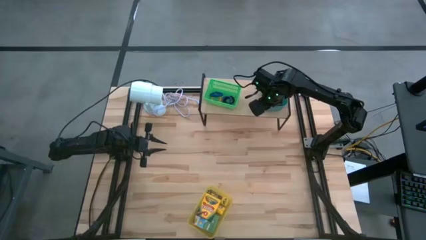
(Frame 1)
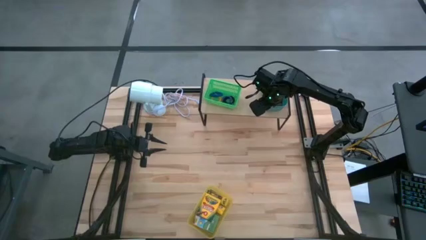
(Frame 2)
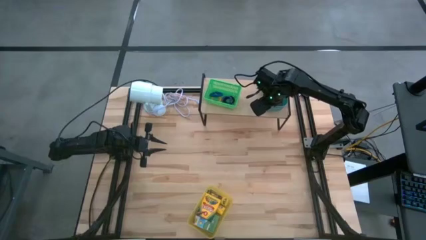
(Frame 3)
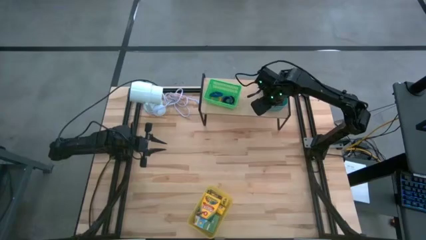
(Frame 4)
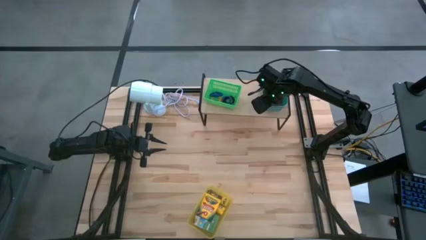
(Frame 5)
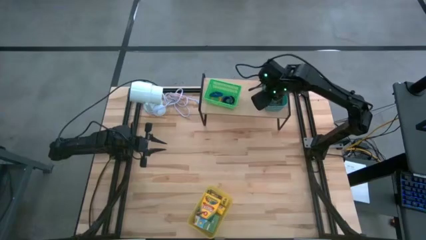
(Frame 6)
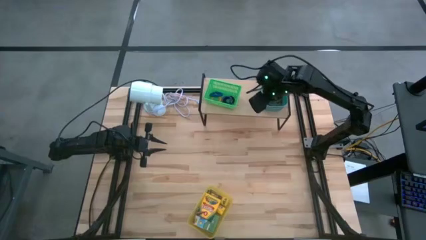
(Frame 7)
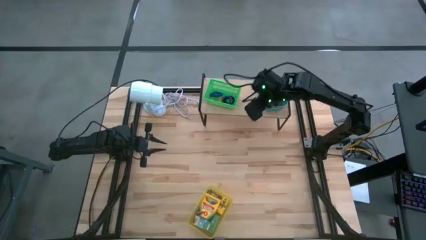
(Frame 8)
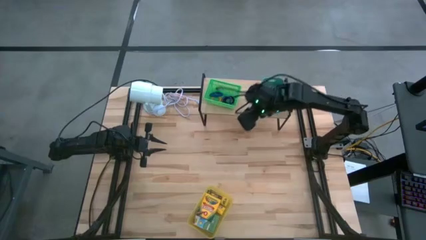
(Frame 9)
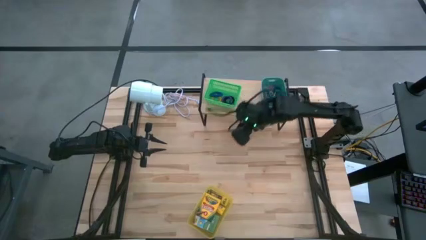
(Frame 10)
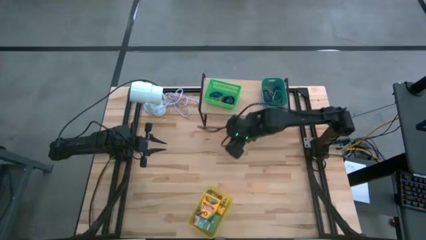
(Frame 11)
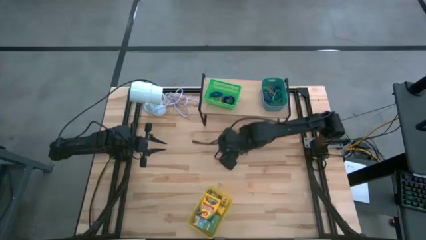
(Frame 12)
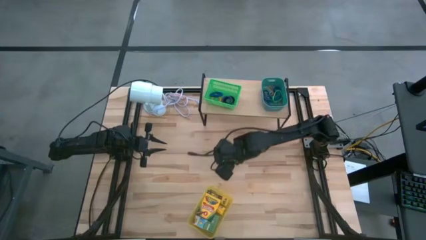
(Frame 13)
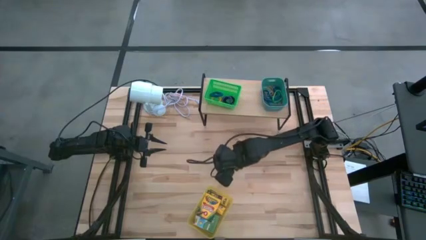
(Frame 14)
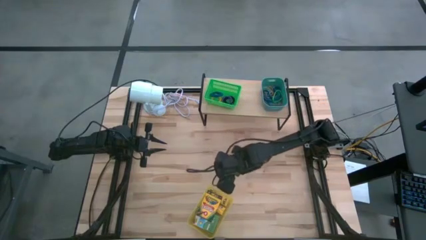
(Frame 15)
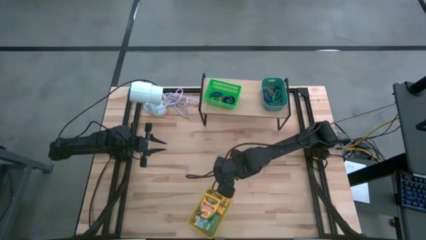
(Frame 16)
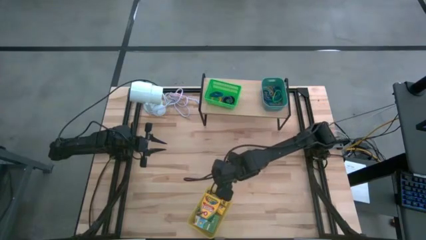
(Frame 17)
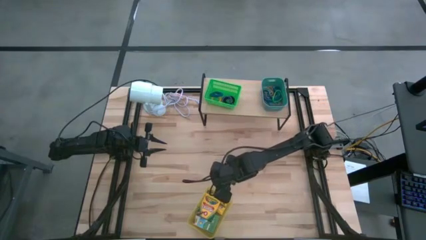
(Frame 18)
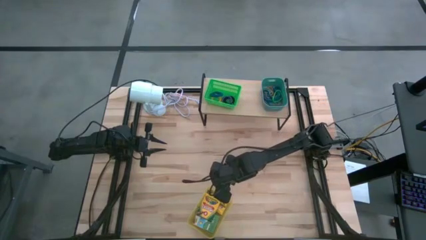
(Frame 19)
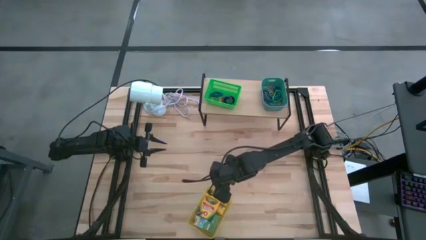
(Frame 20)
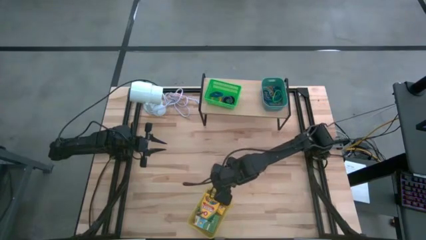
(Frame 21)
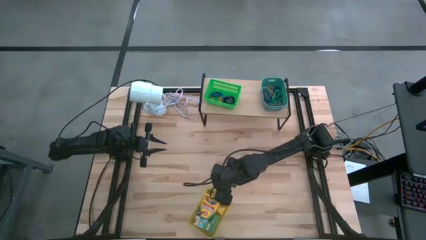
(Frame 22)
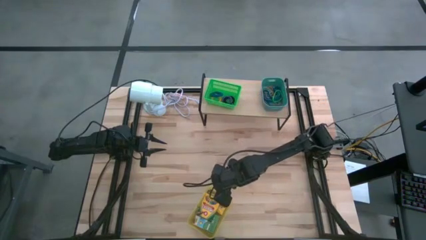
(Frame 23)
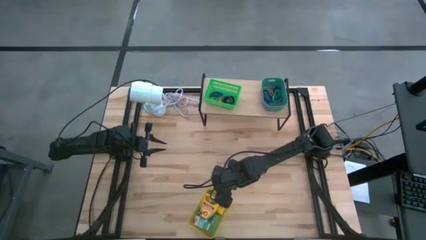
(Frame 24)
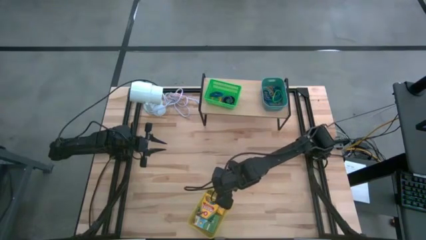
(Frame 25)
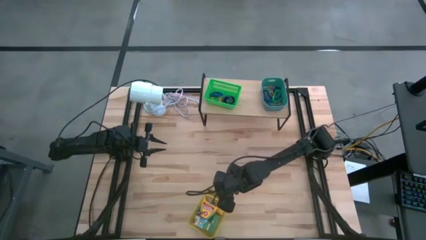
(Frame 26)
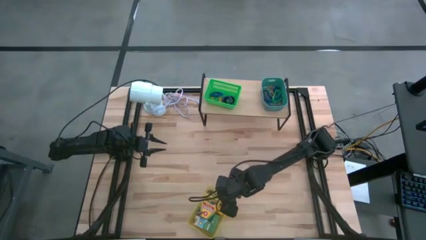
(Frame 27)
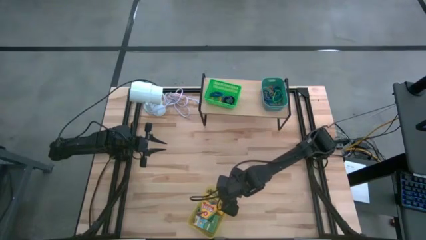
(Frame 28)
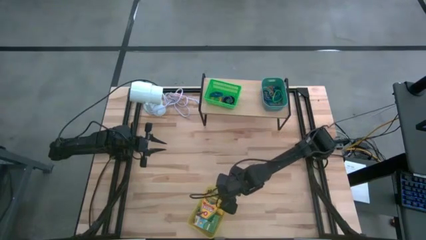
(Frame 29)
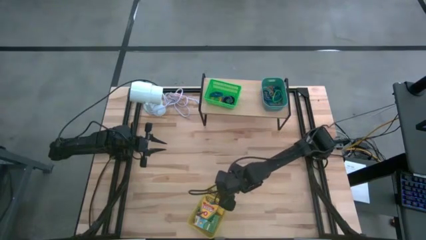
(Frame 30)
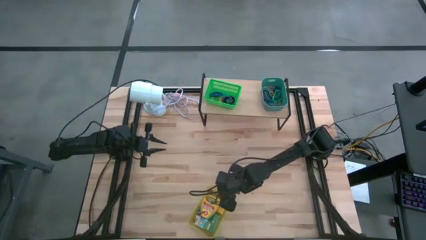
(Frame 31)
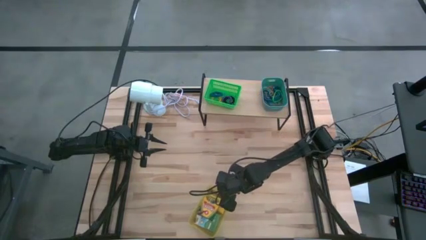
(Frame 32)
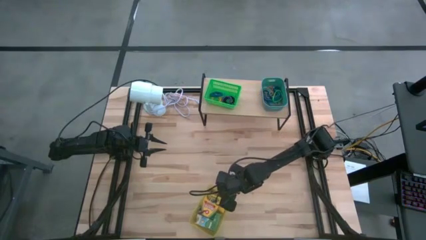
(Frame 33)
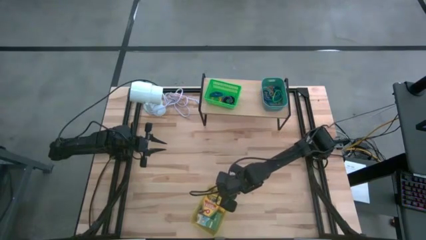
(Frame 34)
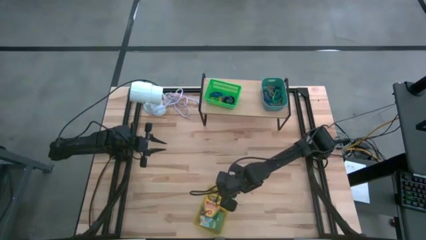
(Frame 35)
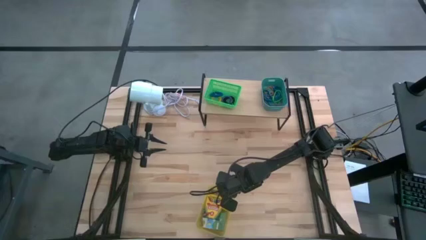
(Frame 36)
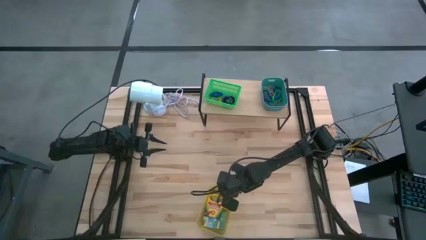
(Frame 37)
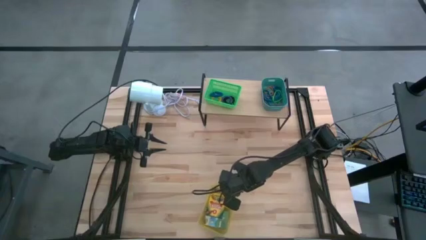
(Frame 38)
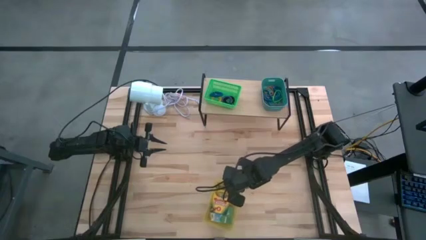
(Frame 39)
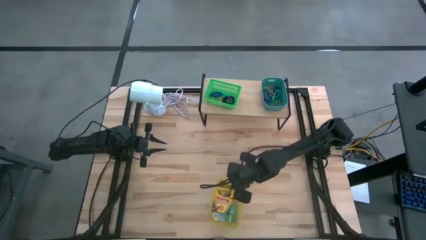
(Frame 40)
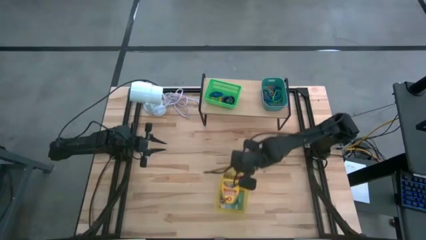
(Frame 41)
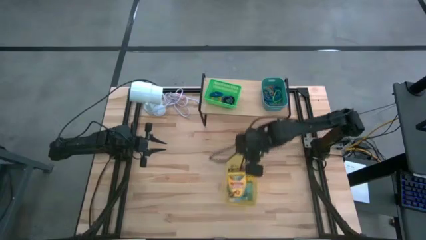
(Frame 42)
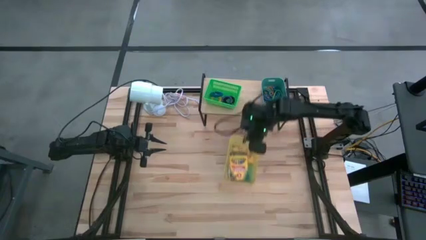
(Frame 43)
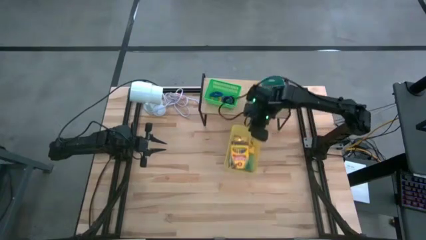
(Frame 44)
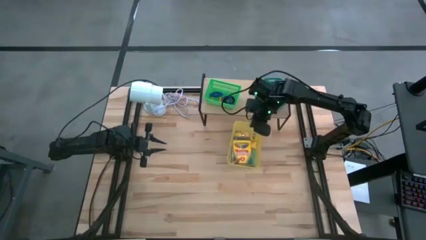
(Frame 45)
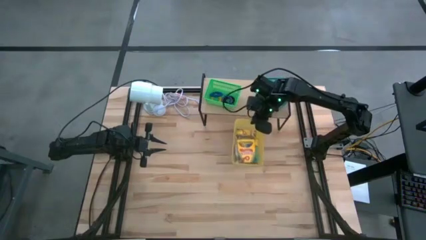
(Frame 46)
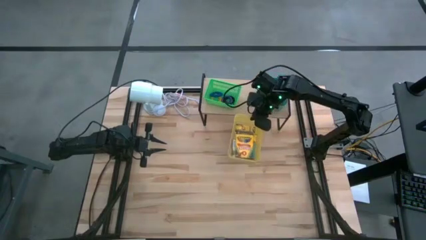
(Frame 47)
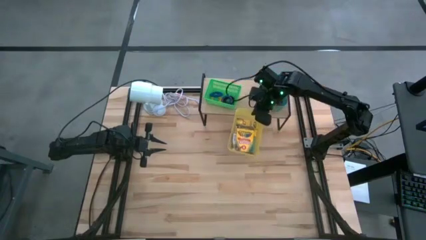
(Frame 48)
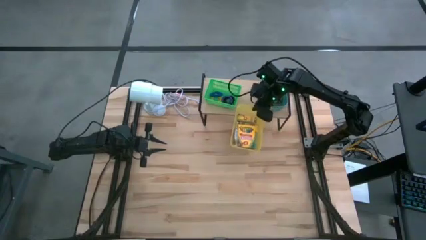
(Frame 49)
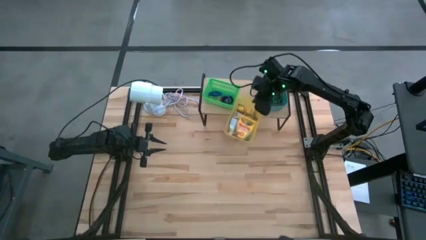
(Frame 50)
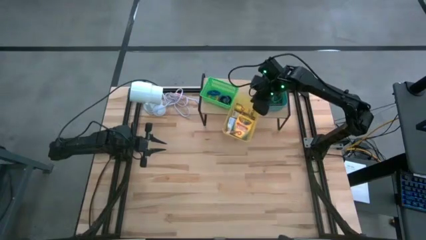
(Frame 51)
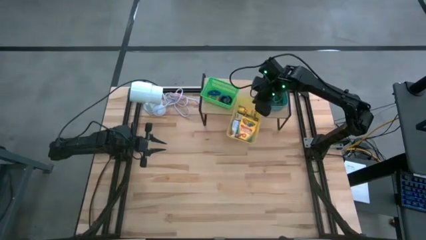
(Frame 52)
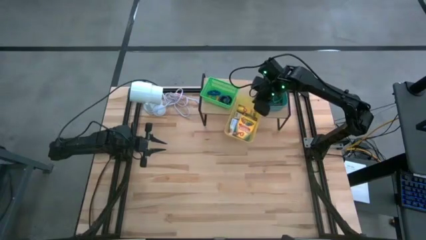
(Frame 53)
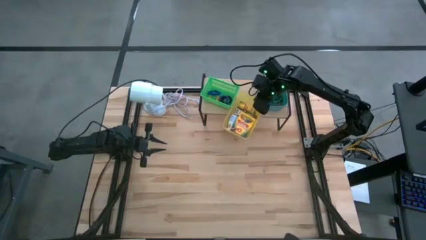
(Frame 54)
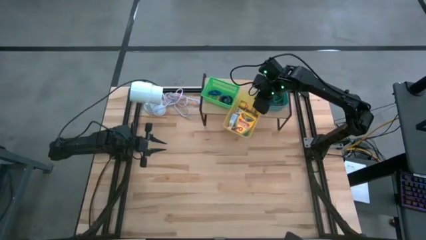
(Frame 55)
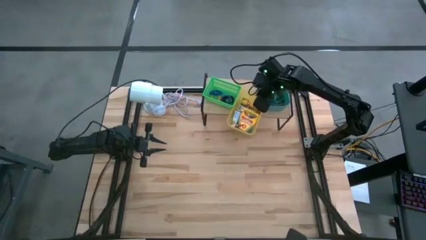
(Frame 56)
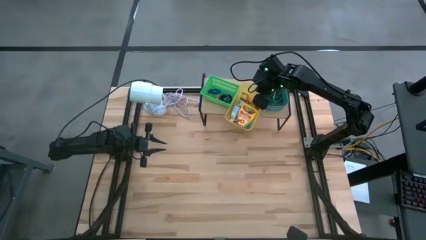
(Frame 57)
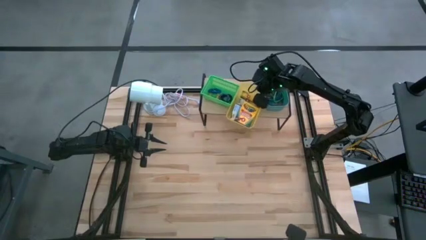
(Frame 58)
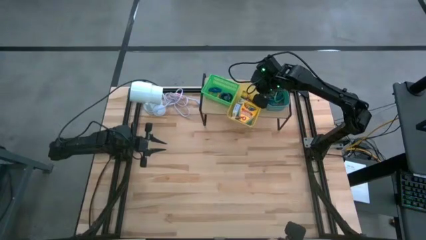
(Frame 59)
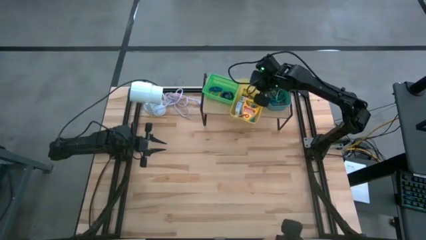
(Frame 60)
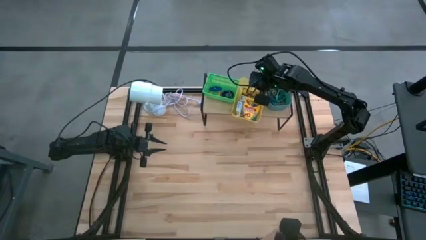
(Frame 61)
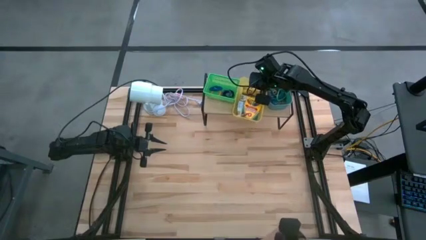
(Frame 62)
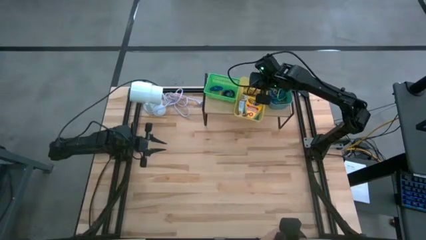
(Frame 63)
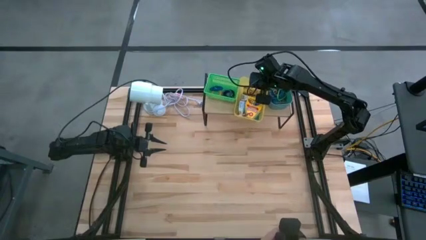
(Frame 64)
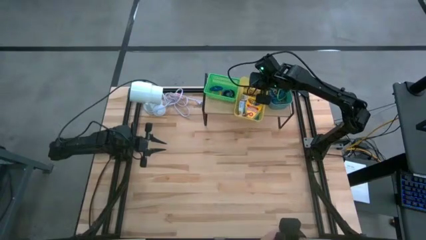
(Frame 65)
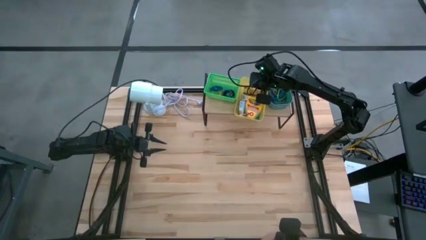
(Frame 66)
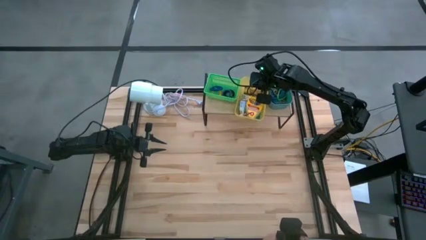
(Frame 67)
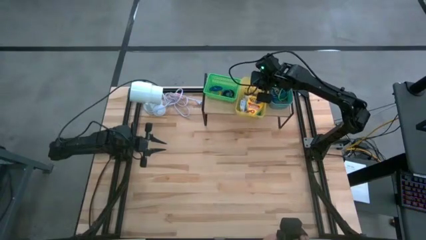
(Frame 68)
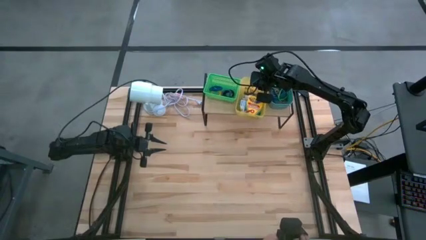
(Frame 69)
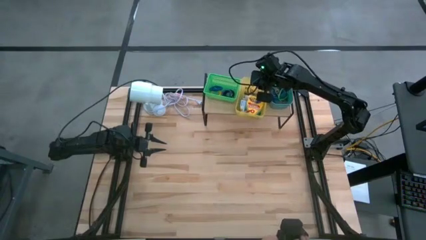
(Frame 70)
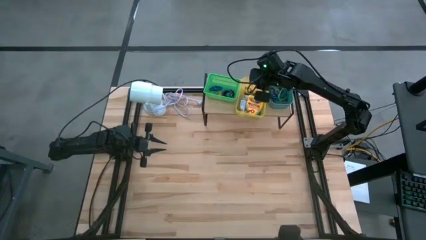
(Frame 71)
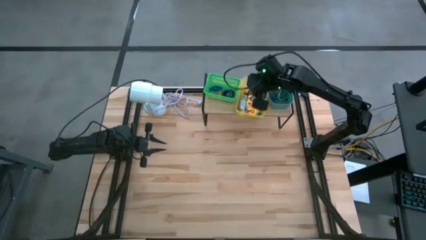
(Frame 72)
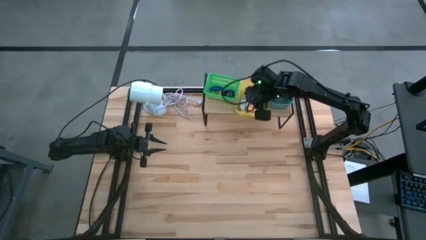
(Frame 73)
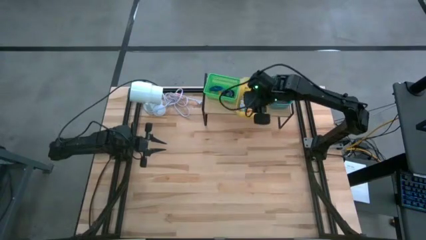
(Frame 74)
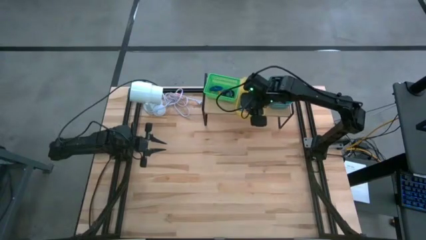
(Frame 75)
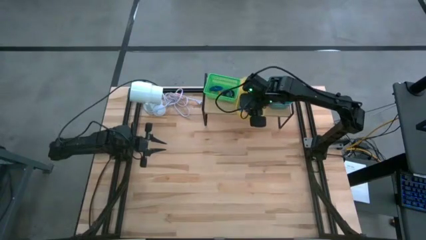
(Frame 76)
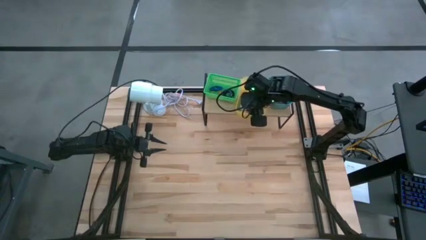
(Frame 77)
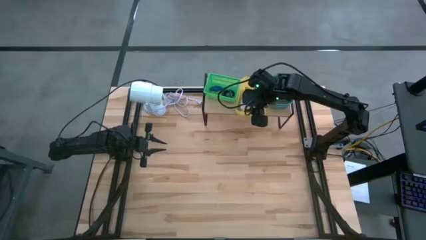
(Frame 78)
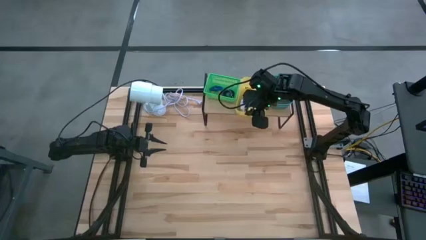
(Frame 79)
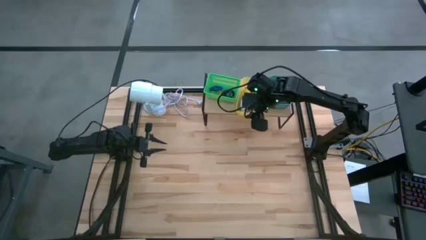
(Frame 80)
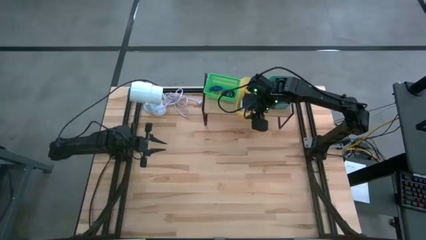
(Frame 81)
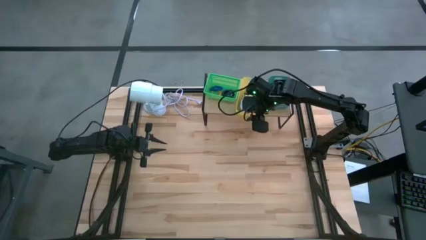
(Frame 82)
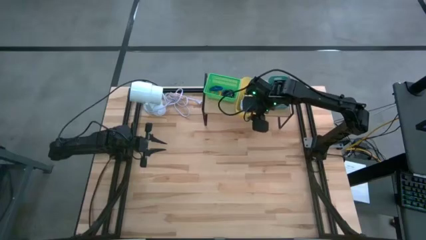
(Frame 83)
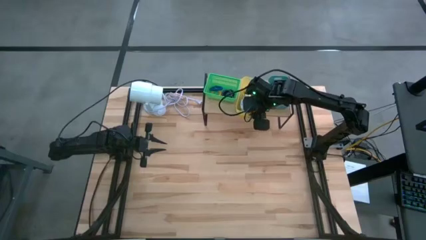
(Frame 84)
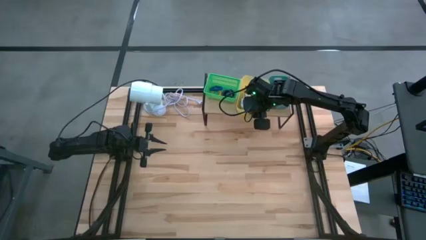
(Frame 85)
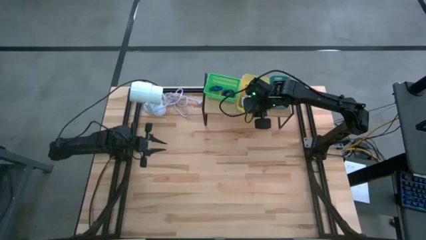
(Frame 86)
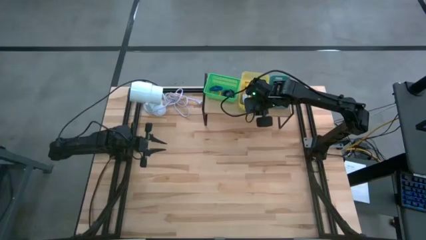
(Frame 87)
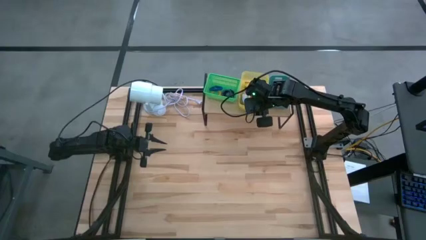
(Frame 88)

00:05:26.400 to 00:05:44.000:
Task: Pick & Place Office Desk Supplies
Put the yellow bin on the shelf
